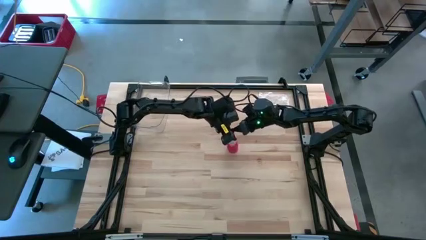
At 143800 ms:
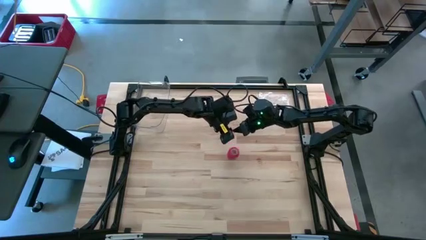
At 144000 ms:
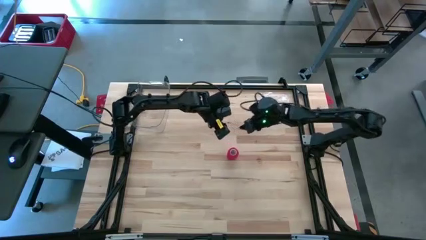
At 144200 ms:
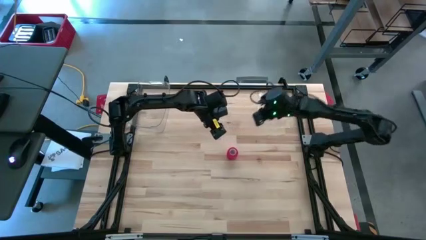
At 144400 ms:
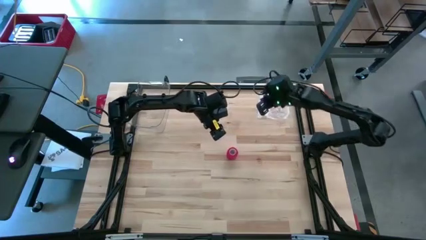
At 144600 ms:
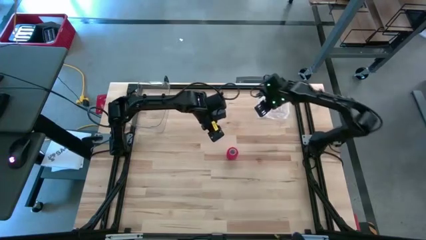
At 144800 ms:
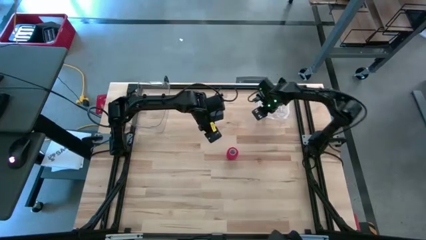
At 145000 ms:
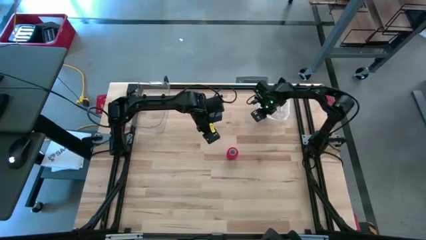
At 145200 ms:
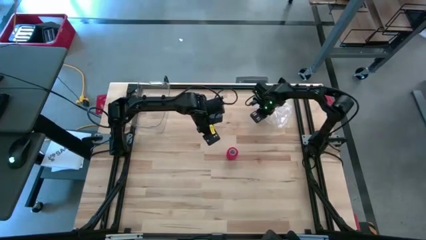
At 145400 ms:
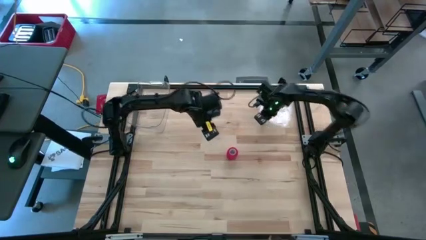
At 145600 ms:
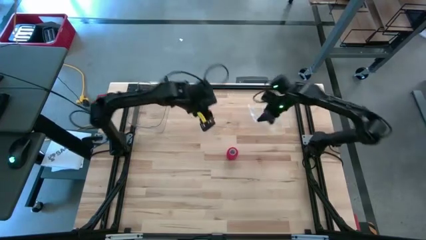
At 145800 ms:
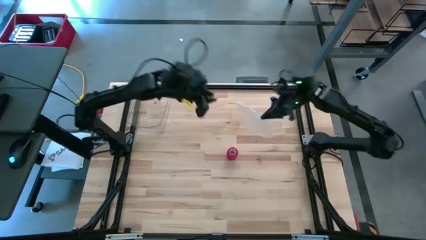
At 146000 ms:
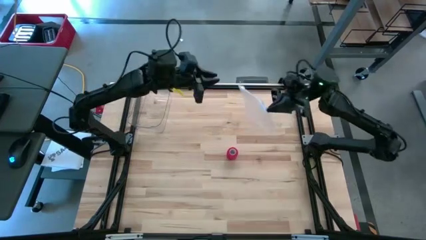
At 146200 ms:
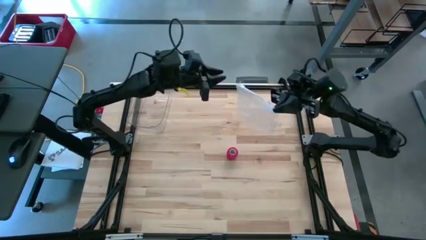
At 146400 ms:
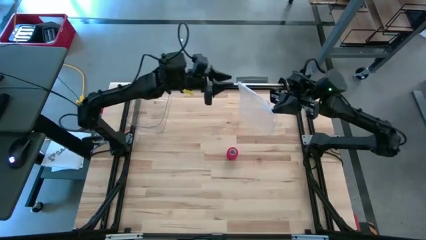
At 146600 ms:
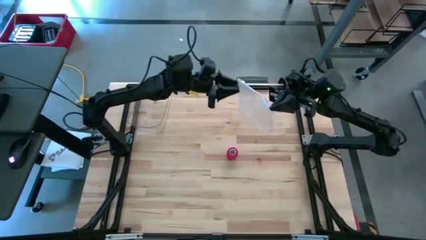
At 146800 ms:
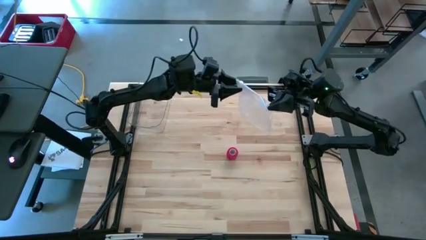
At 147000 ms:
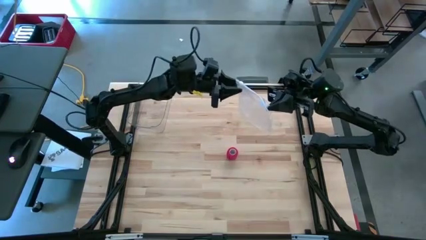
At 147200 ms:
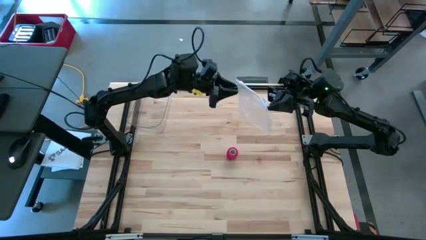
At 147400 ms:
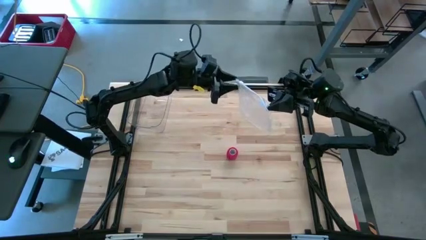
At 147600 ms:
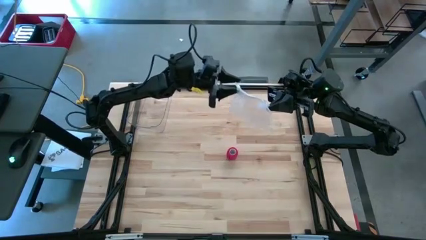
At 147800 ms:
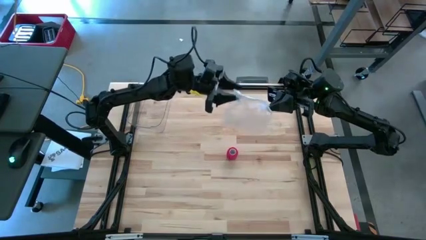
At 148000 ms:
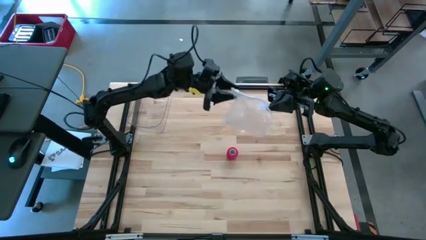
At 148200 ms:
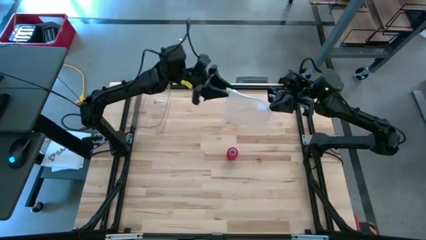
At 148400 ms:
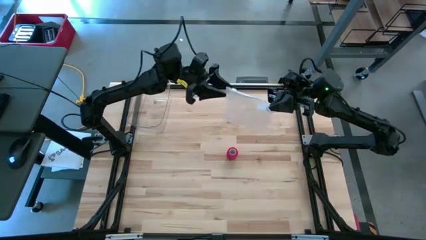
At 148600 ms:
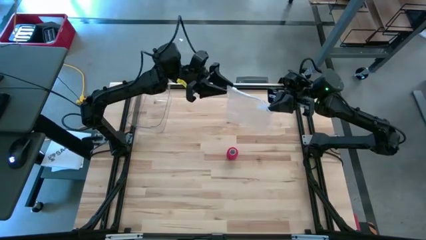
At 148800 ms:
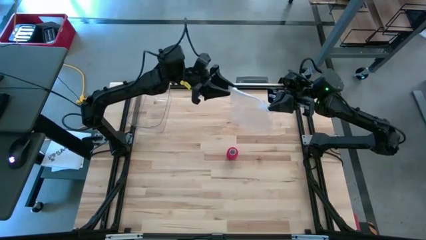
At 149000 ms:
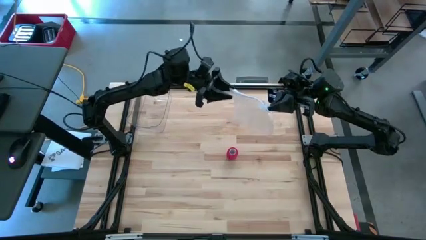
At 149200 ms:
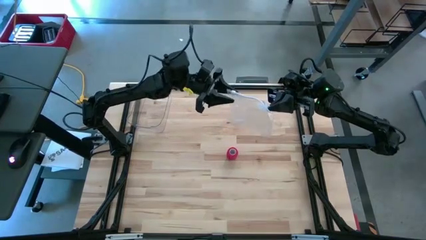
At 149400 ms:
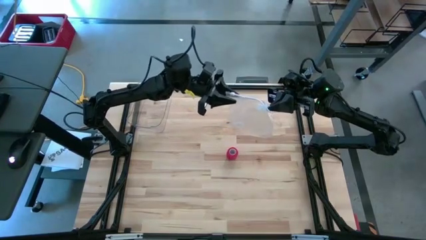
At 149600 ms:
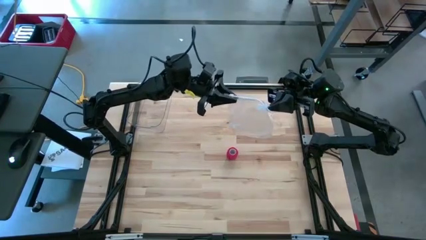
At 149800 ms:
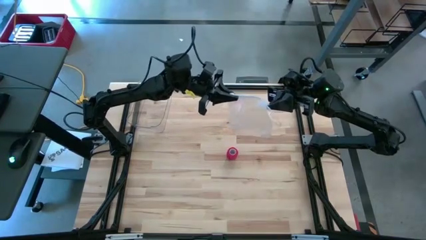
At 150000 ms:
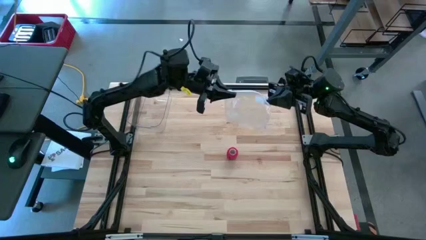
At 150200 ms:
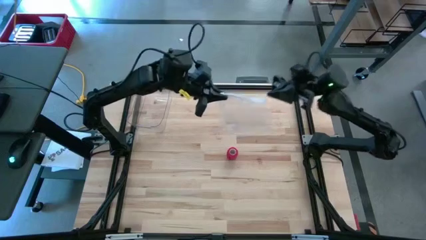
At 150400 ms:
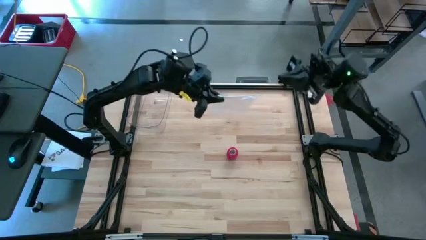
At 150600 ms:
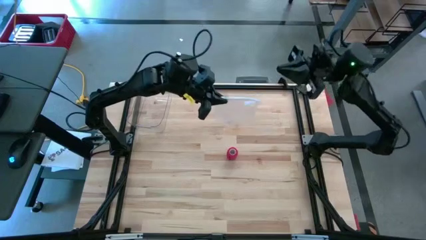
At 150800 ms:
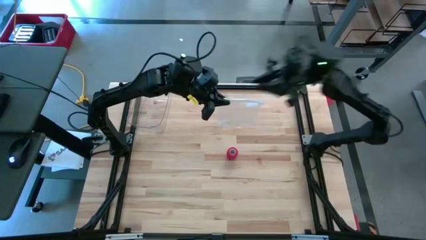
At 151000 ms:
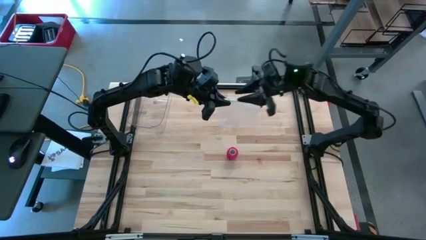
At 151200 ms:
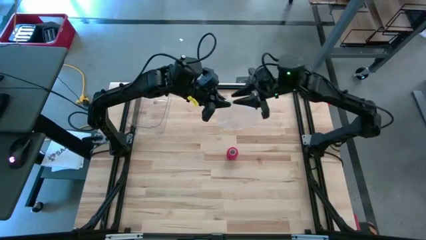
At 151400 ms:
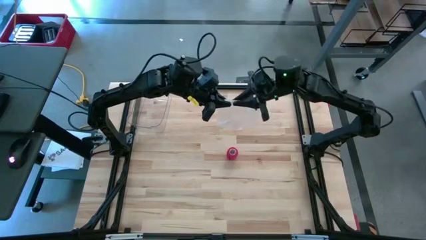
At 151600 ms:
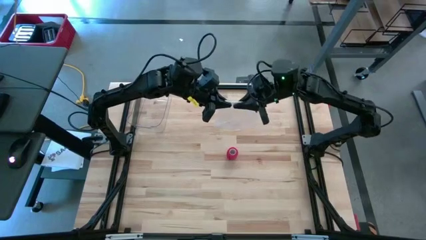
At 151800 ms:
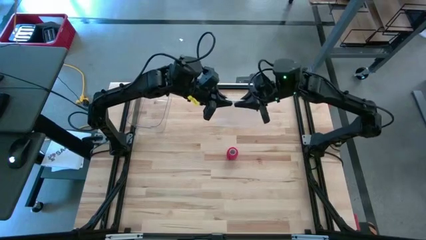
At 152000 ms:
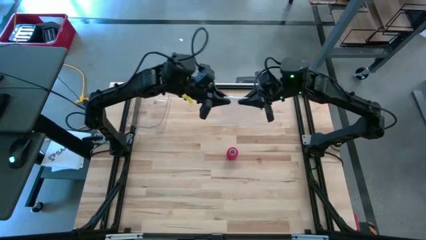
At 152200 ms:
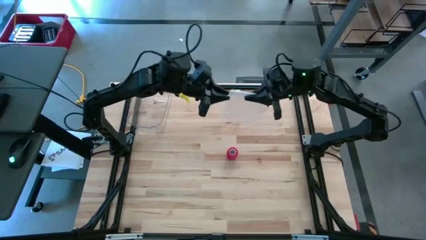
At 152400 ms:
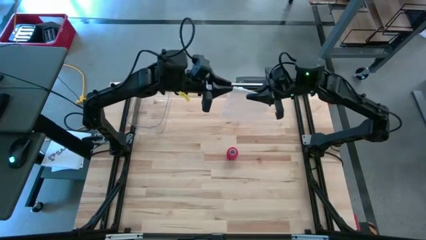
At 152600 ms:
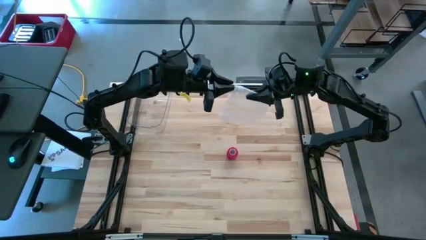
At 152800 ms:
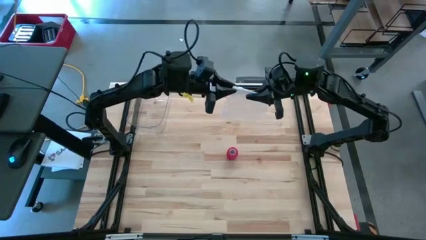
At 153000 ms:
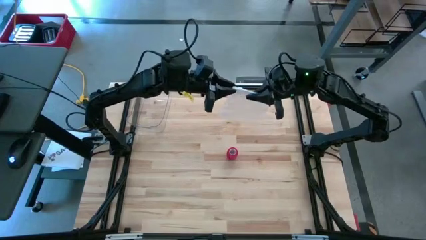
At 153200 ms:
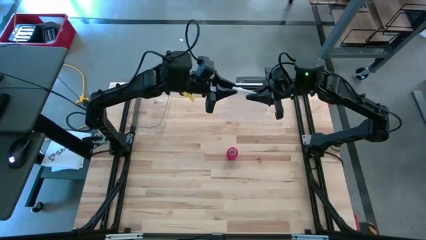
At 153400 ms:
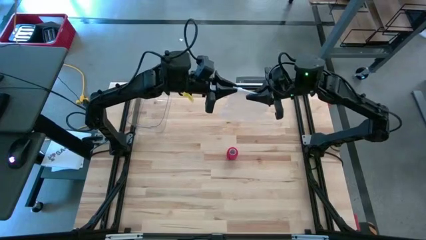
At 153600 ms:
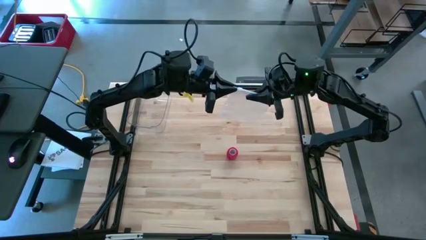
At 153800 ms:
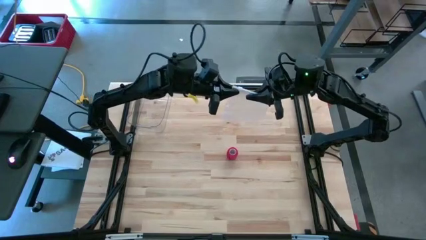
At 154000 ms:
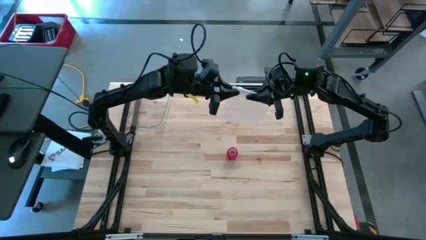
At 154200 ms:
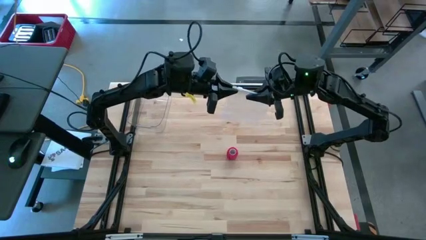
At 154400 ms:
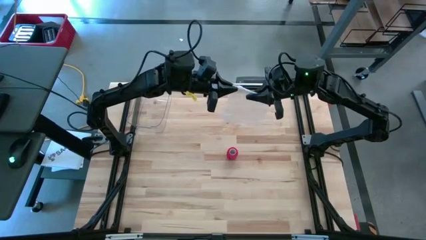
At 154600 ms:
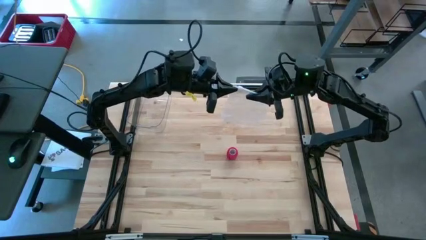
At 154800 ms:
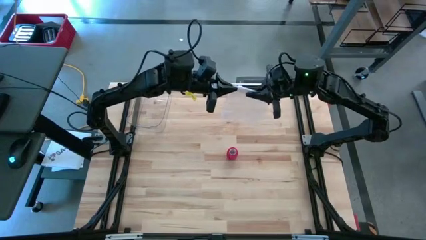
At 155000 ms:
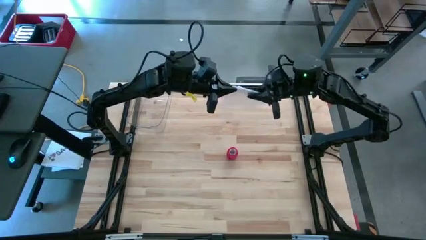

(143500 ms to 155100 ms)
Task: Roll bandage
Open the transparent zip bag

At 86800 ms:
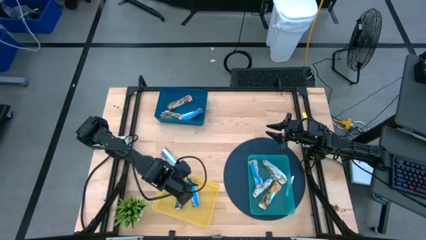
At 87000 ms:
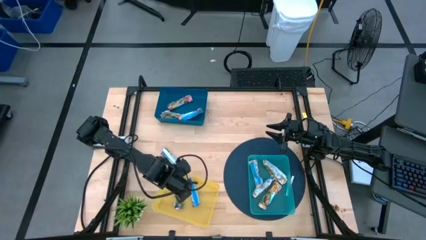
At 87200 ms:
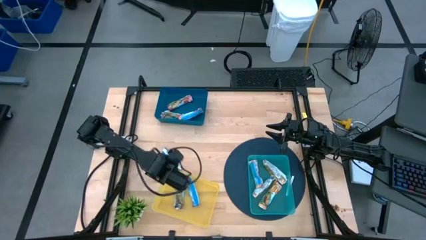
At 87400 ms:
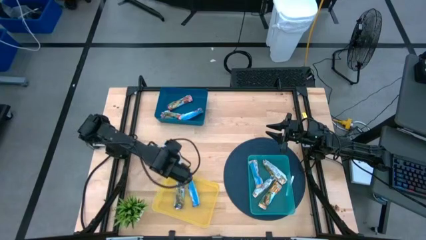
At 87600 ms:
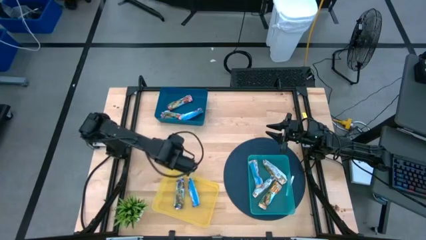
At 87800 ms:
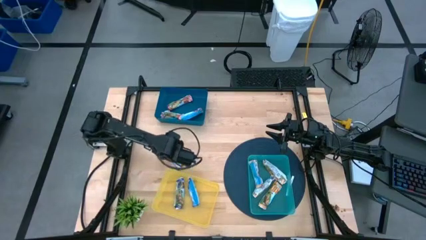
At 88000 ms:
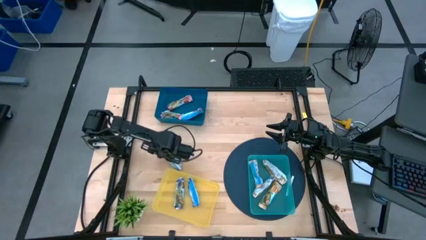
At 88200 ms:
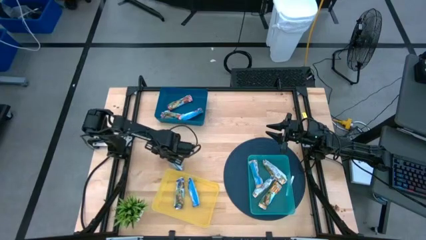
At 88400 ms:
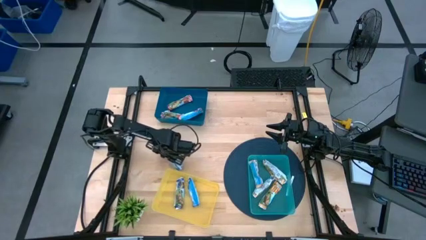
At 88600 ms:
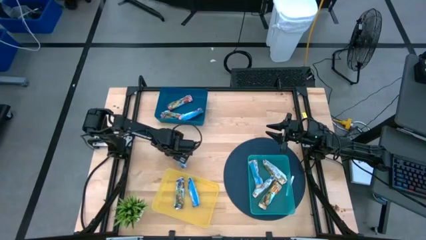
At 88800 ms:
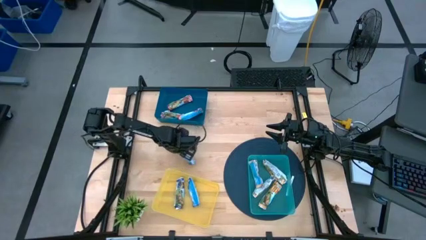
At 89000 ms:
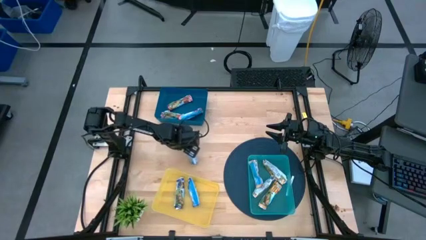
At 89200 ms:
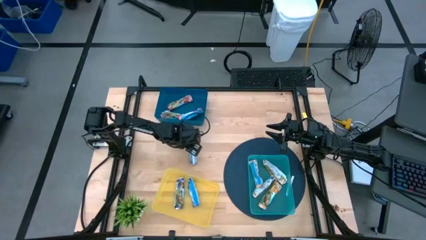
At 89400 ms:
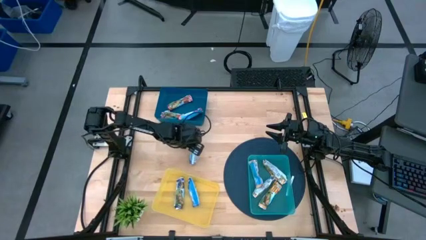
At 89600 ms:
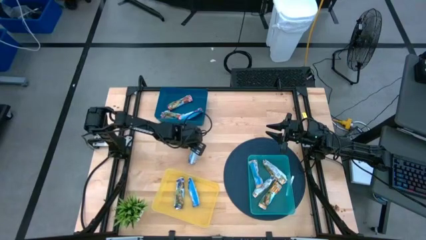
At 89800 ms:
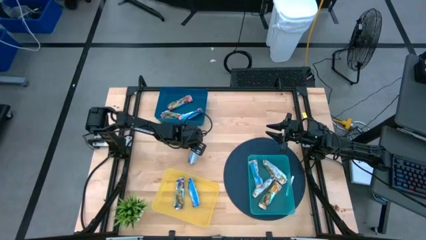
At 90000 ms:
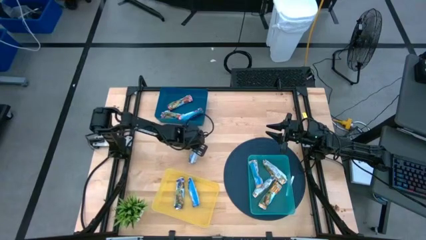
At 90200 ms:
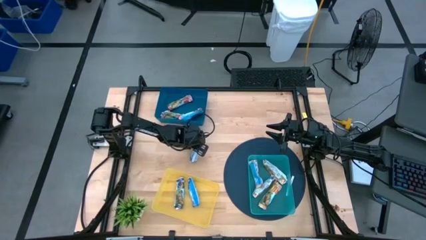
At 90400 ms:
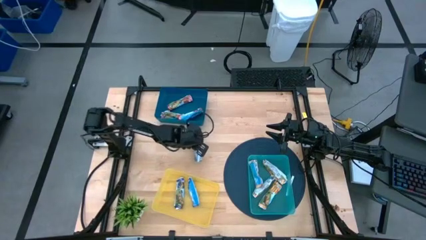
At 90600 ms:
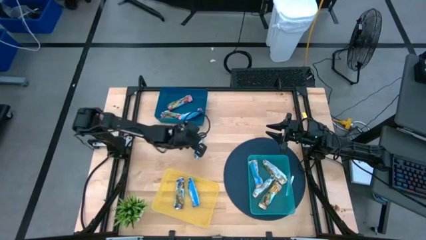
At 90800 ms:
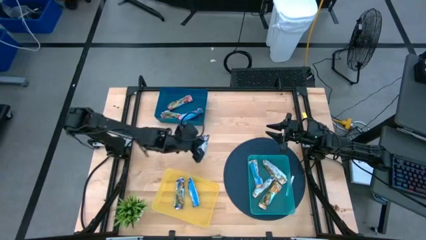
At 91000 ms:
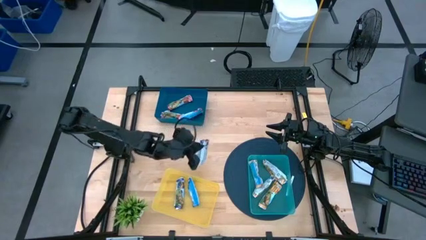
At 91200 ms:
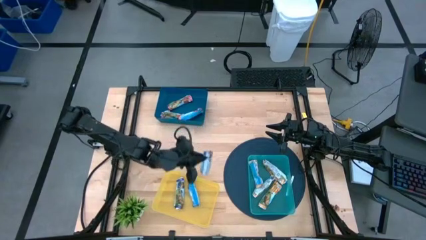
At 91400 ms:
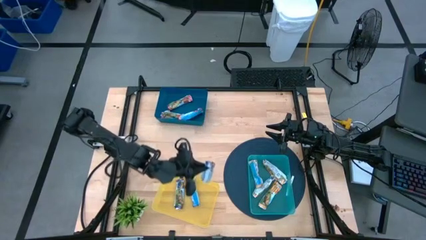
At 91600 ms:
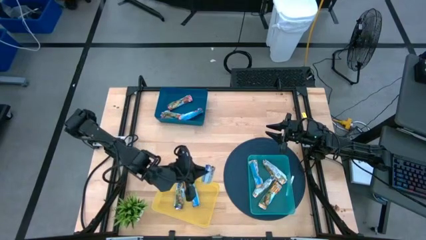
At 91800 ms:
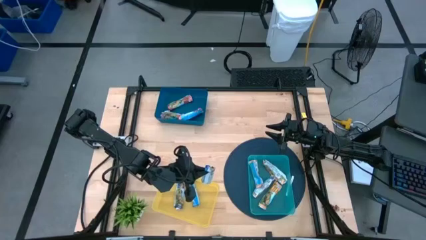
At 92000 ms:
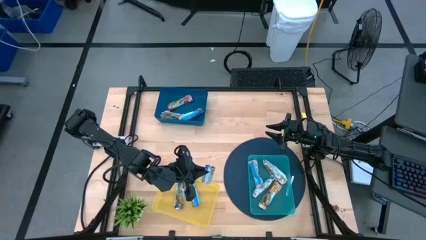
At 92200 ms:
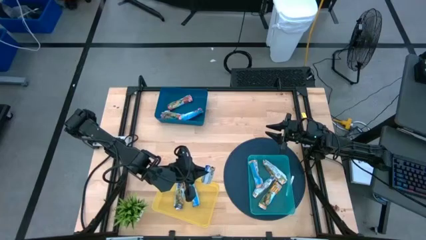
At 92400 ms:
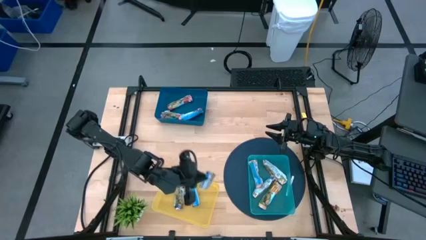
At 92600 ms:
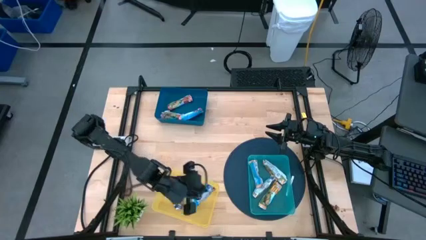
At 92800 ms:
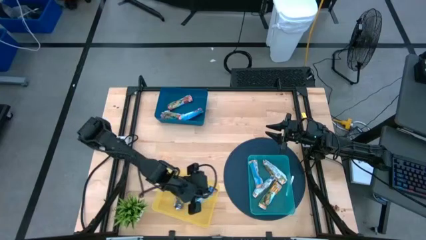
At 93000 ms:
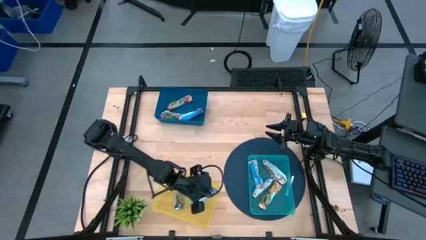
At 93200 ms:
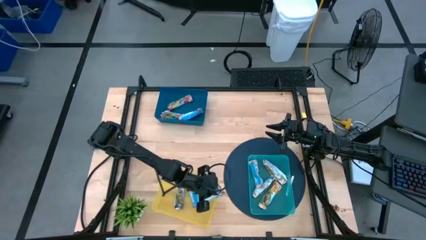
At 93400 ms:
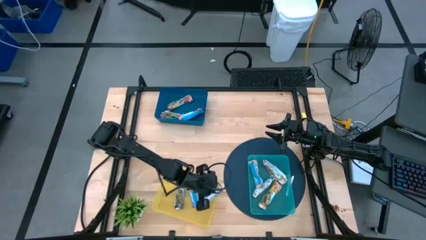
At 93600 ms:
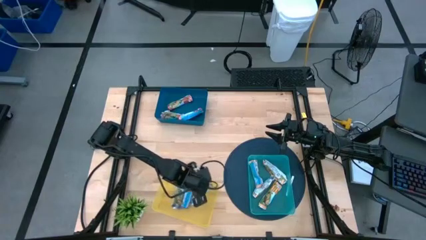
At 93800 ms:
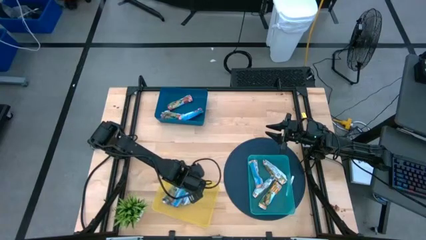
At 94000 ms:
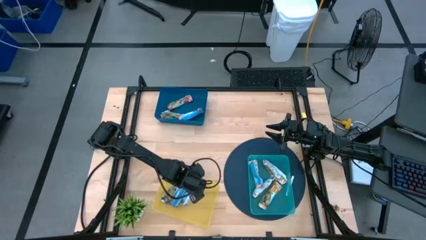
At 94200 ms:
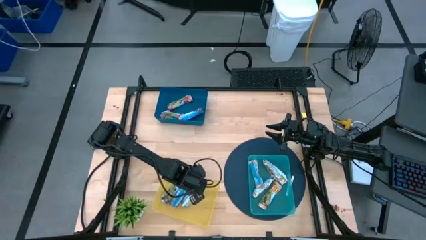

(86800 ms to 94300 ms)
Task: Pick and place Granola Bars by type
Put the blue granola bar into the yellow bin
